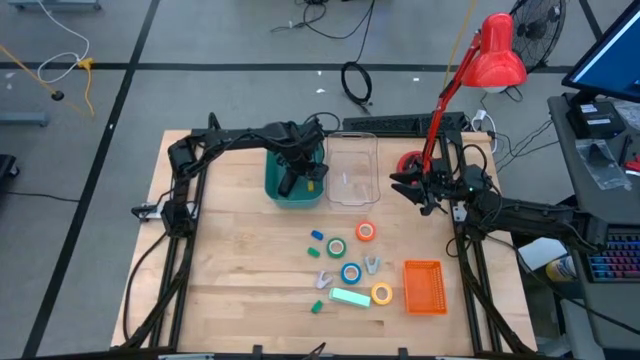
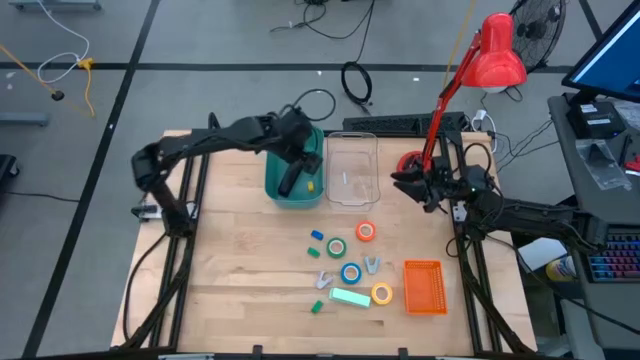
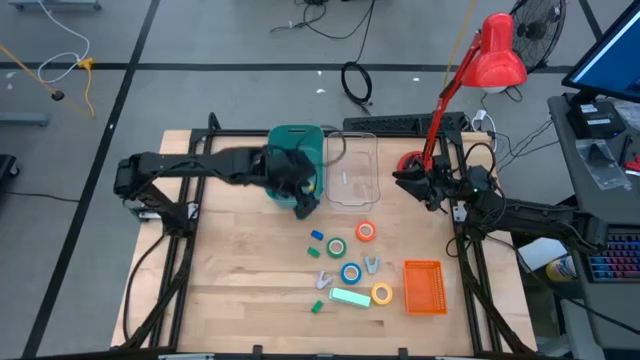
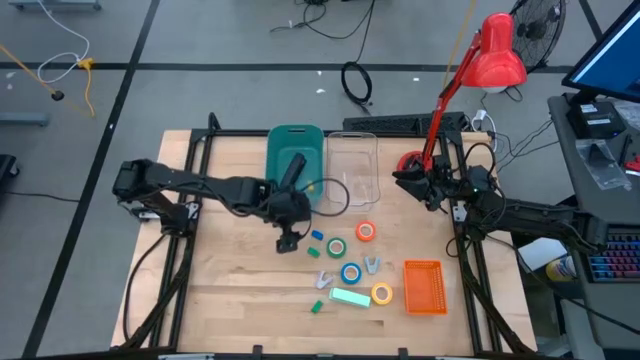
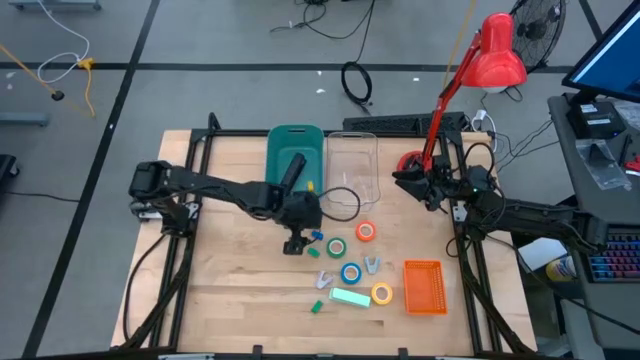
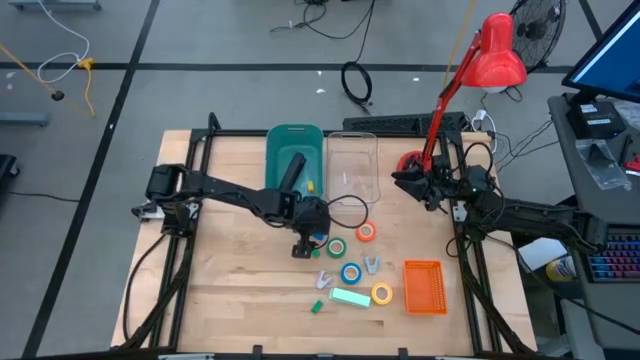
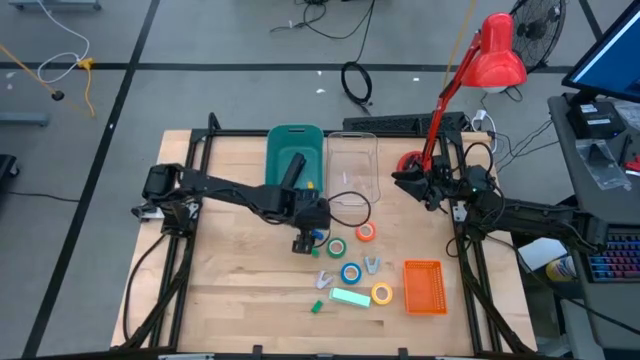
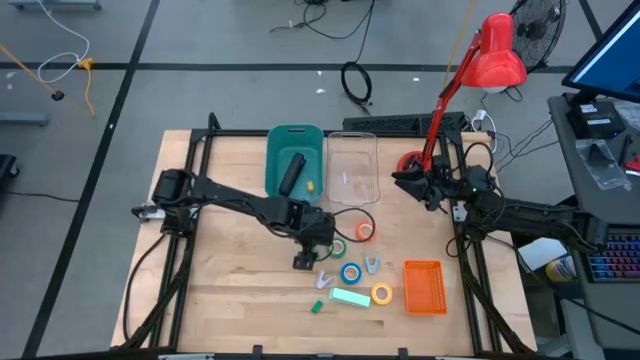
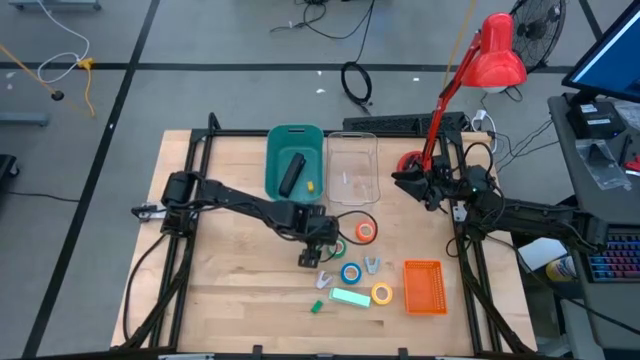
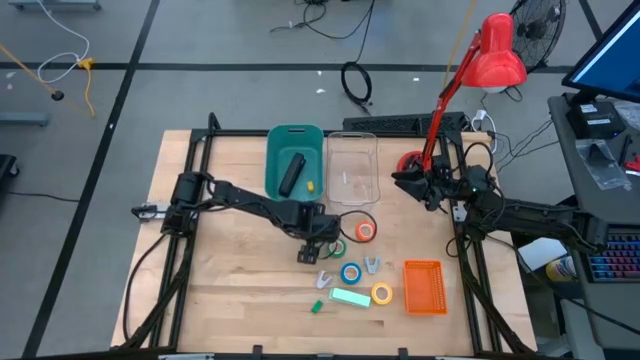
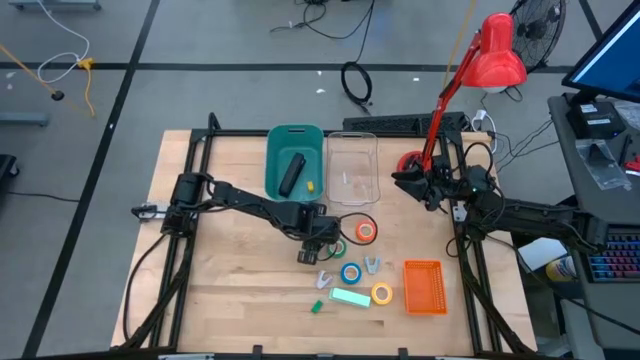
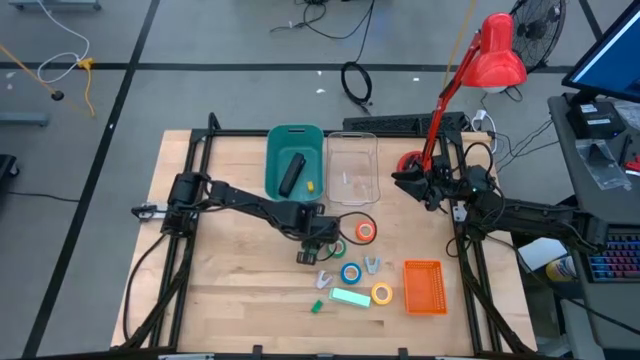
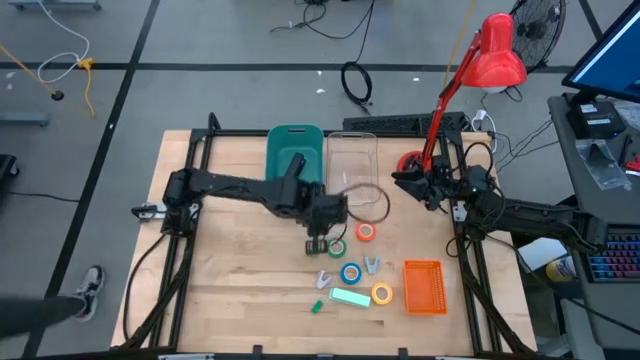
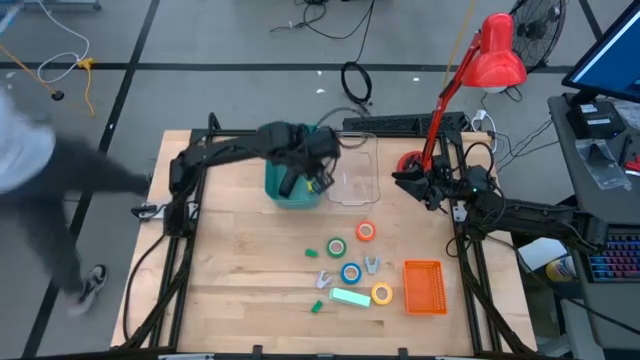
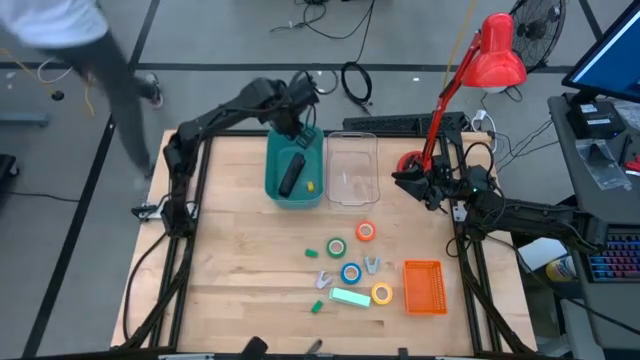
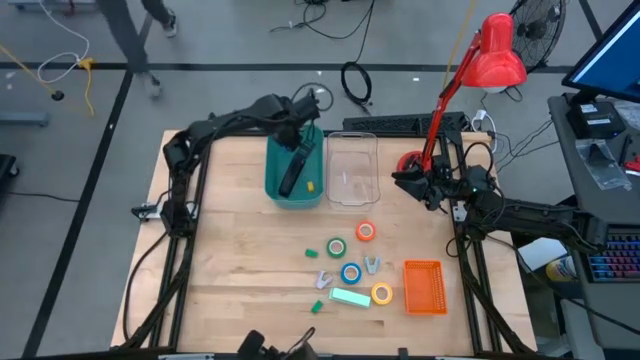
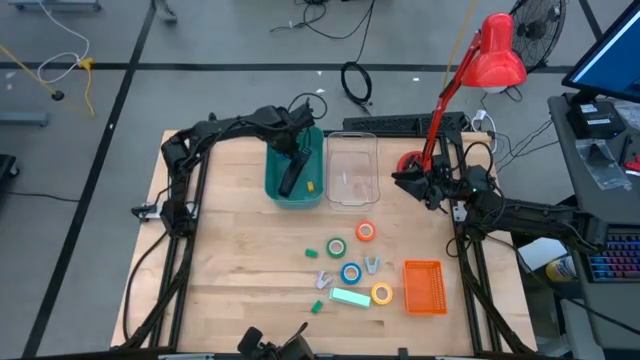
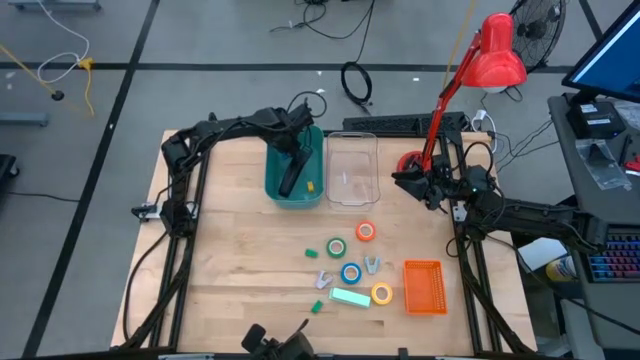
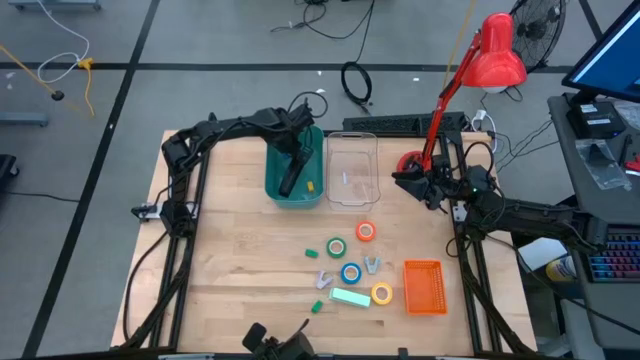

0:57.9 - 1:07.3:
Task: Pick and place Stapler, Stapler remover, tape
Put the small blue stapler into the green bin

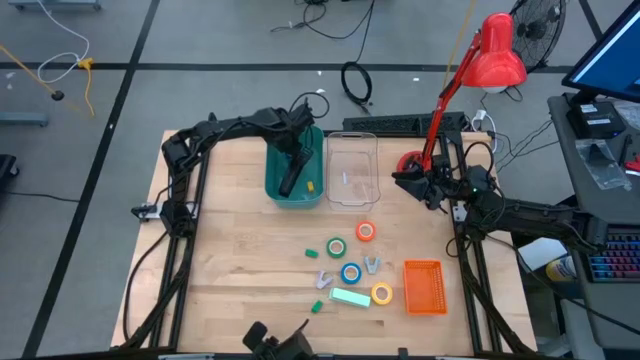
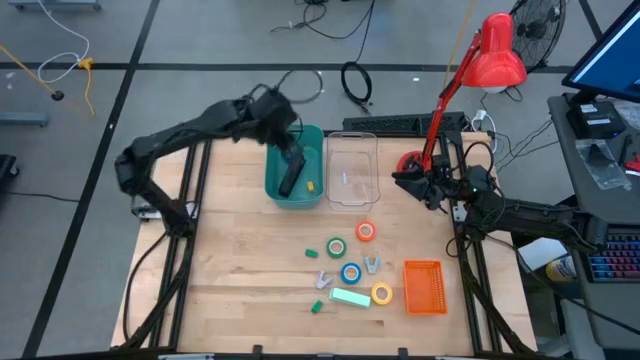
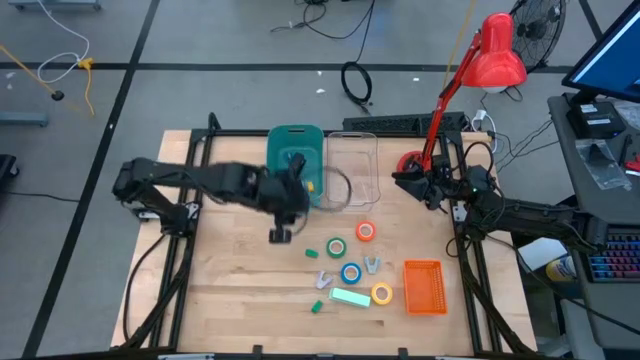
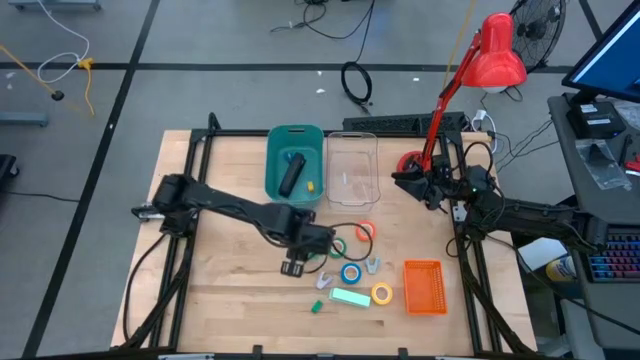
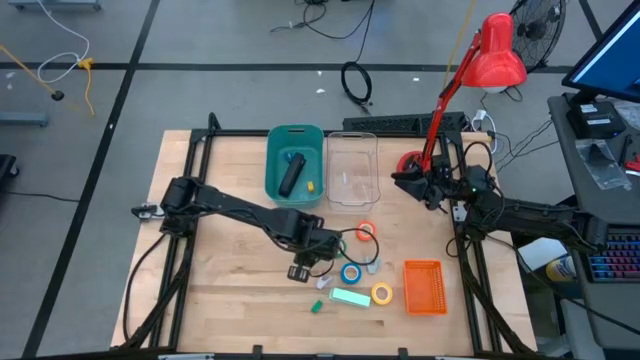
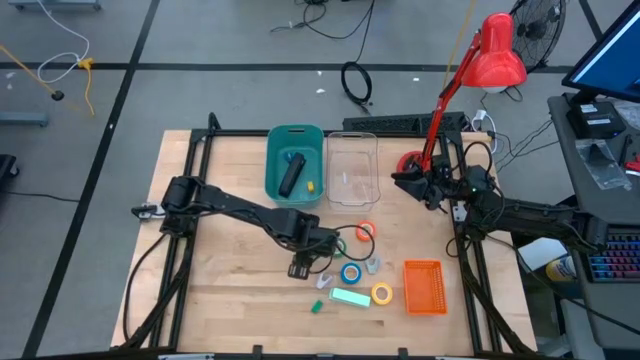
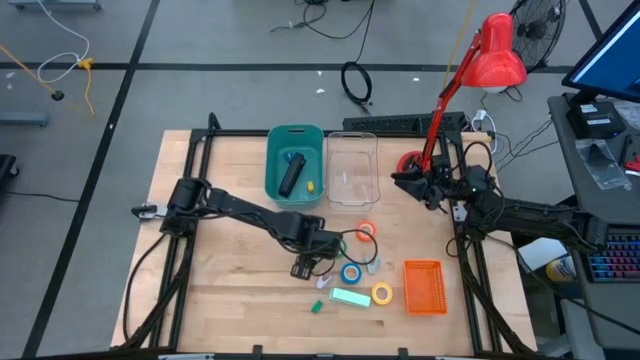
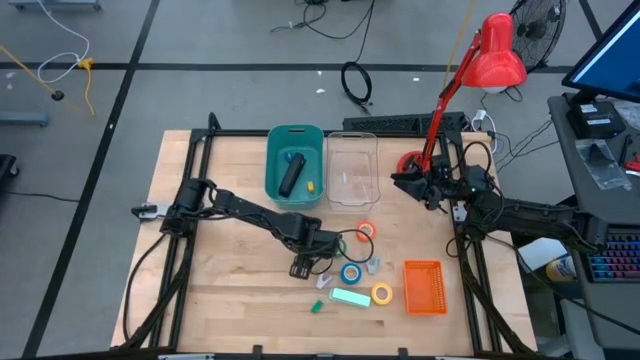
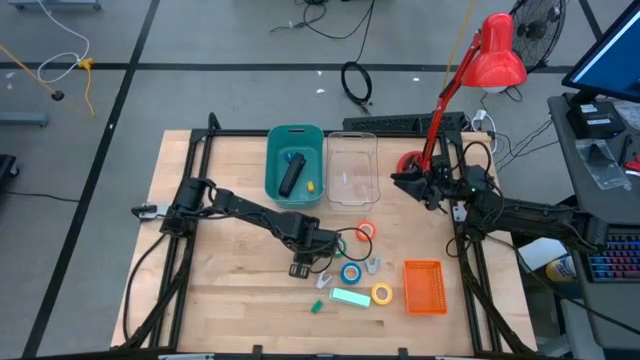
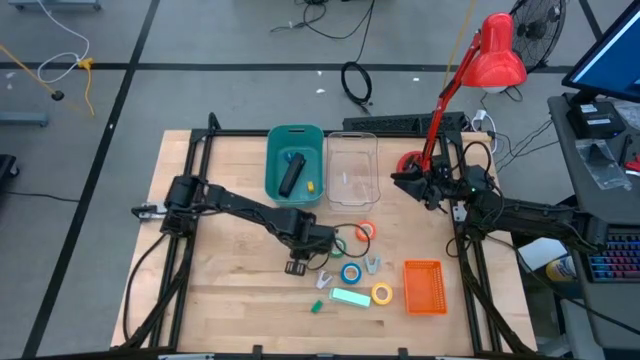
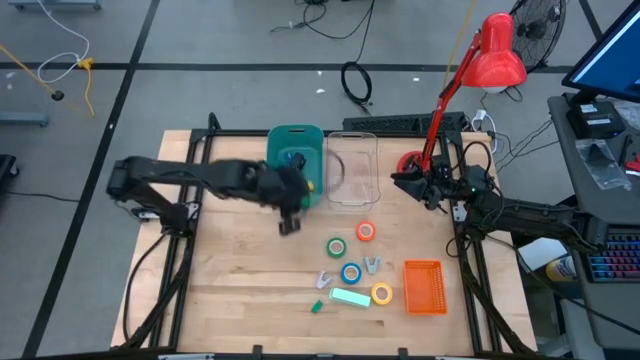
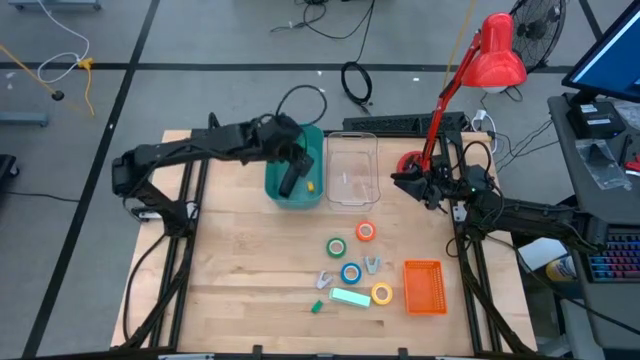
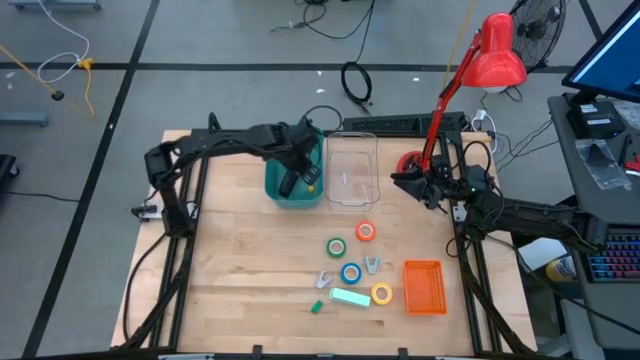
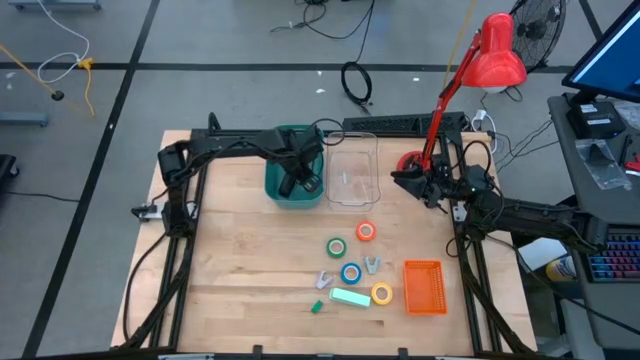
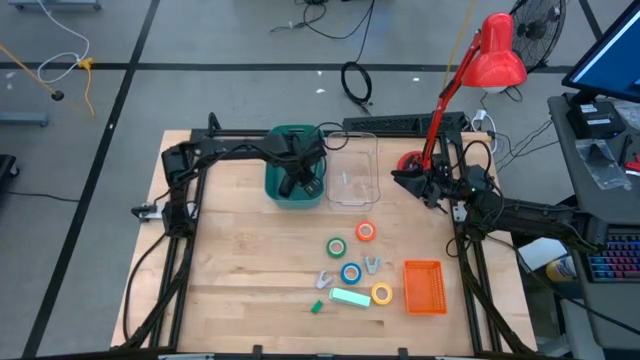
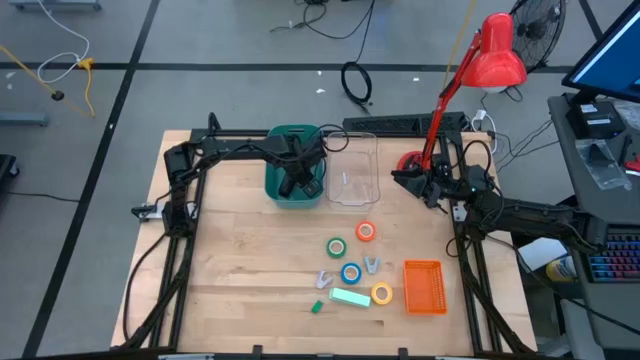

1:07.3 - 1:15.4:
Put the top small green stapler into the green bin
